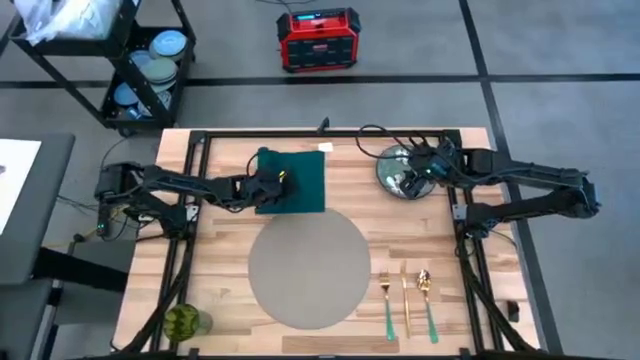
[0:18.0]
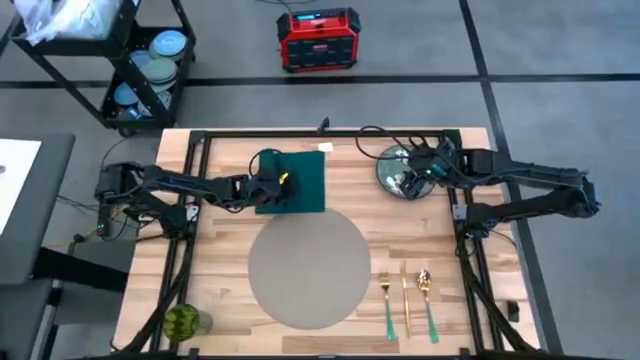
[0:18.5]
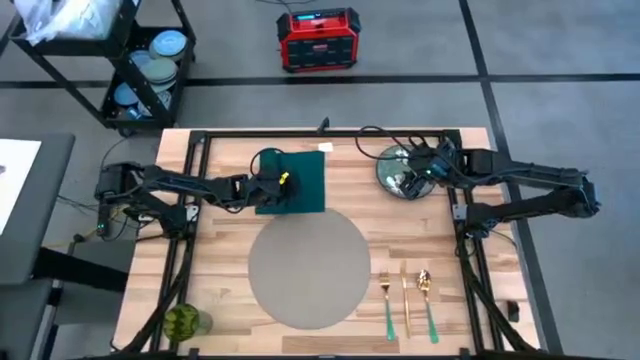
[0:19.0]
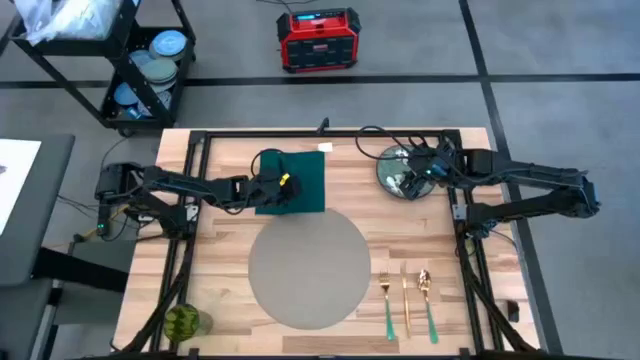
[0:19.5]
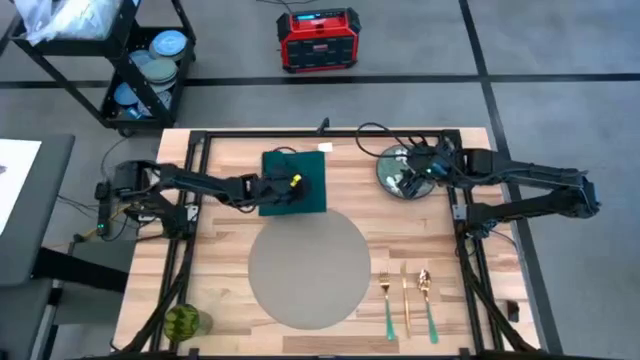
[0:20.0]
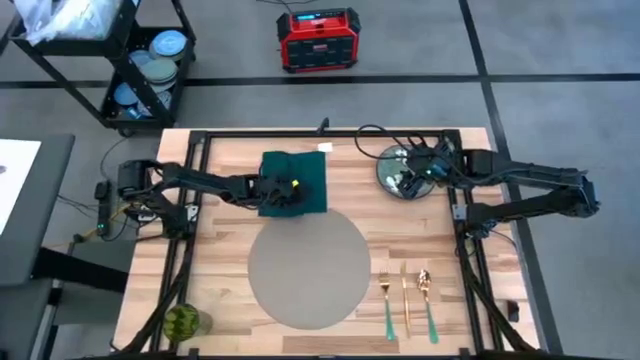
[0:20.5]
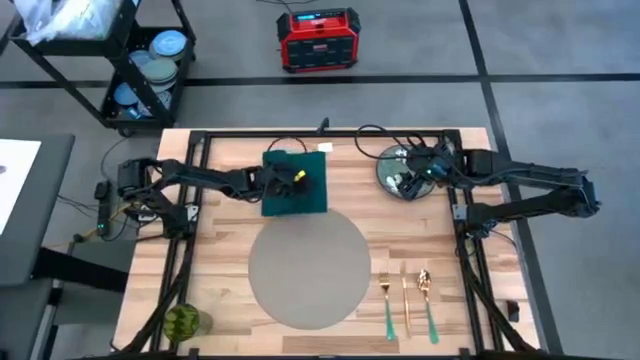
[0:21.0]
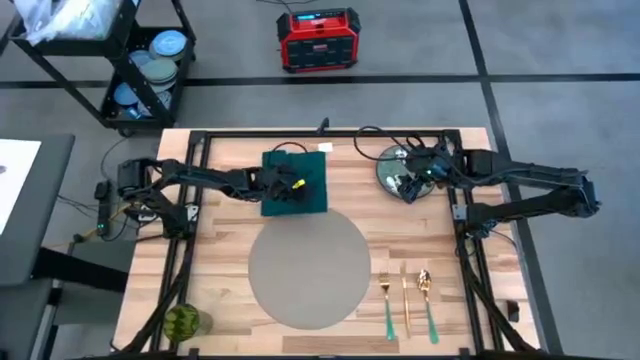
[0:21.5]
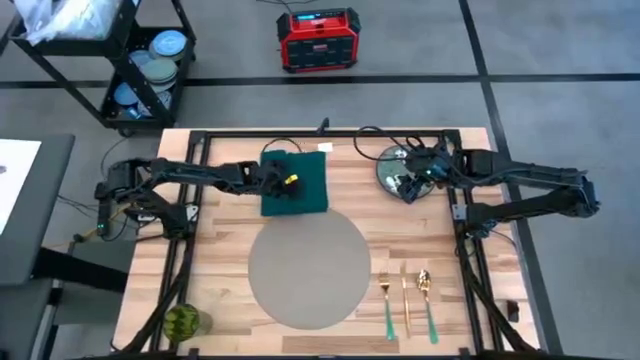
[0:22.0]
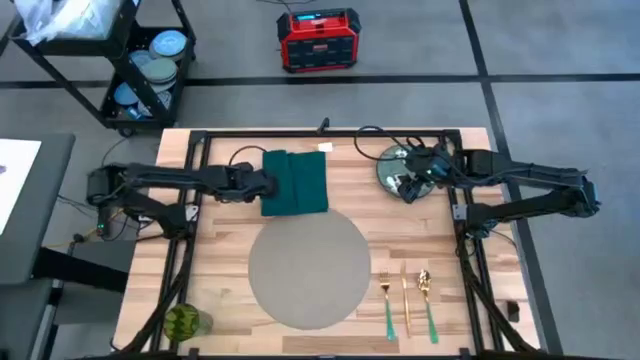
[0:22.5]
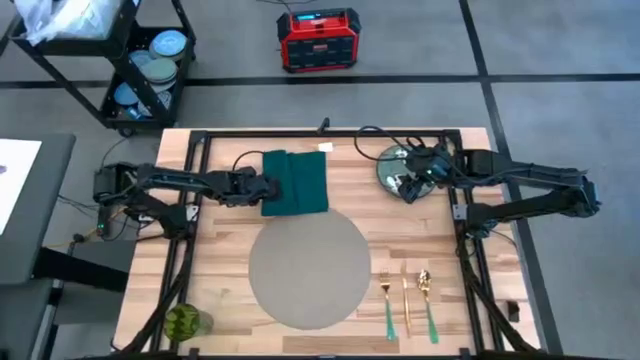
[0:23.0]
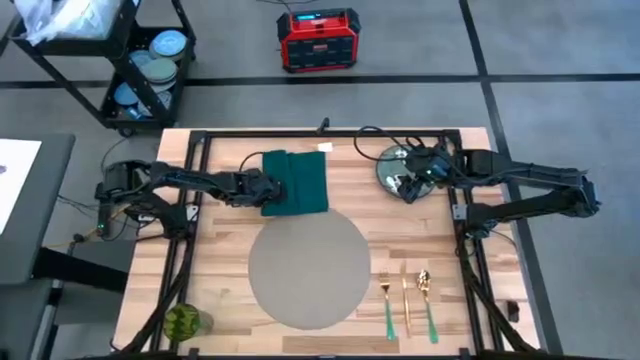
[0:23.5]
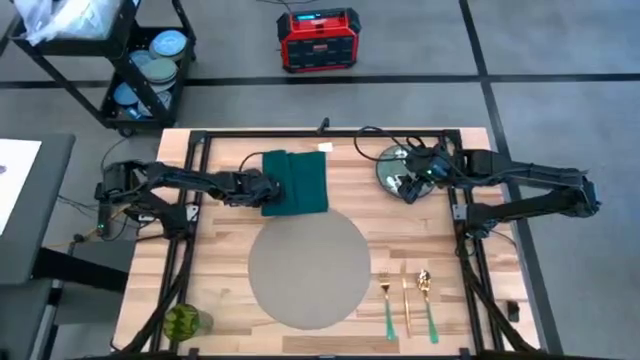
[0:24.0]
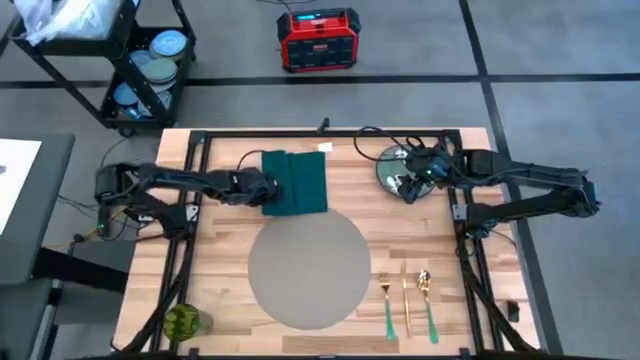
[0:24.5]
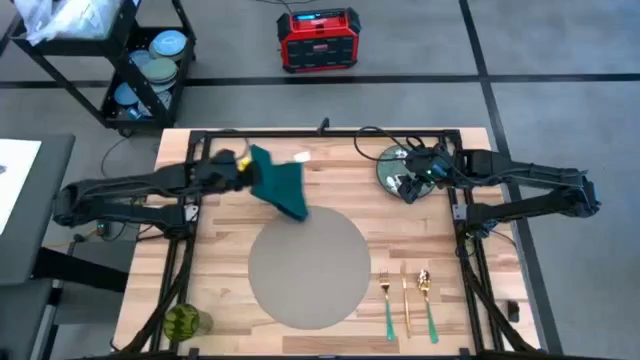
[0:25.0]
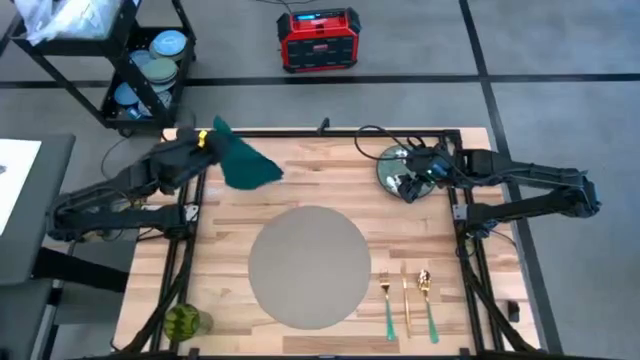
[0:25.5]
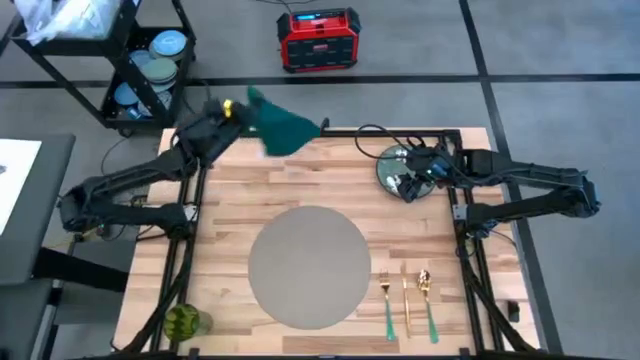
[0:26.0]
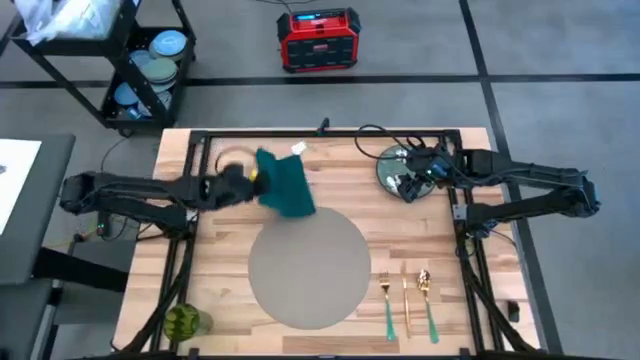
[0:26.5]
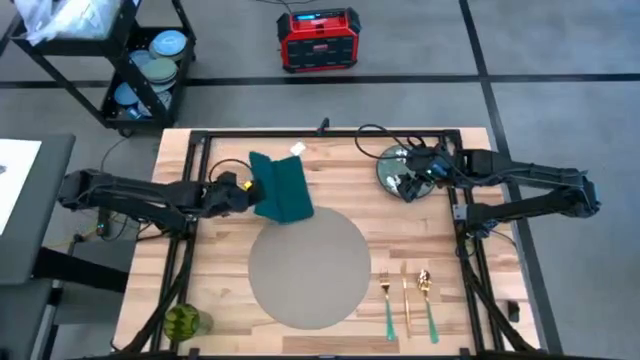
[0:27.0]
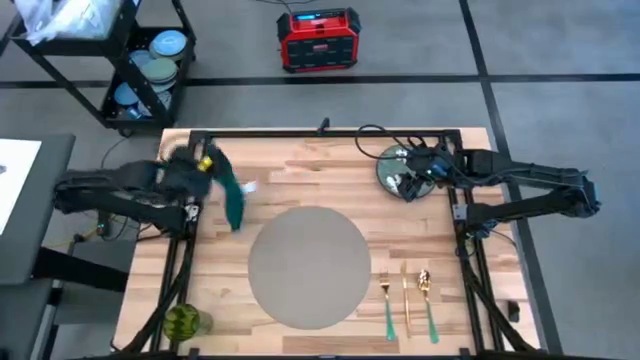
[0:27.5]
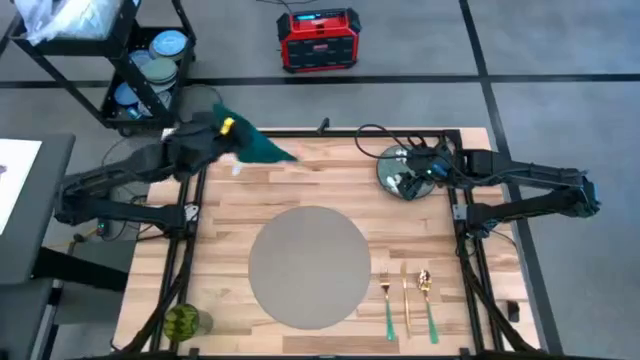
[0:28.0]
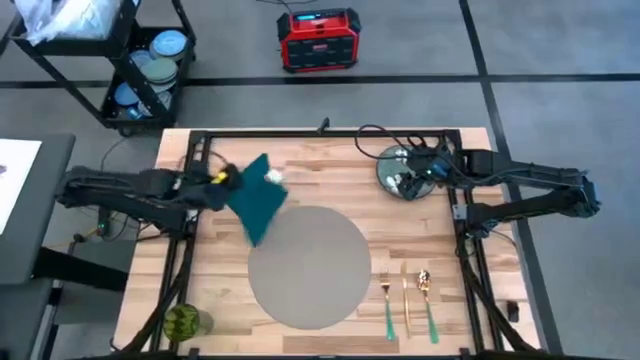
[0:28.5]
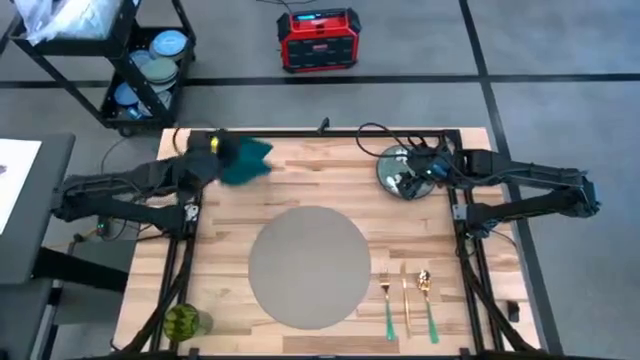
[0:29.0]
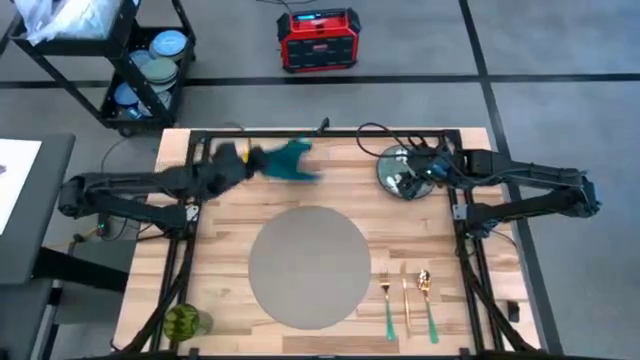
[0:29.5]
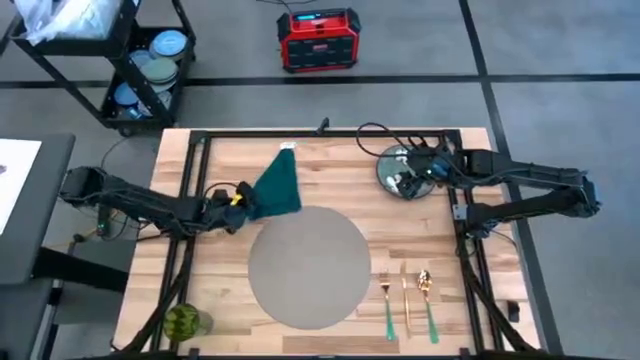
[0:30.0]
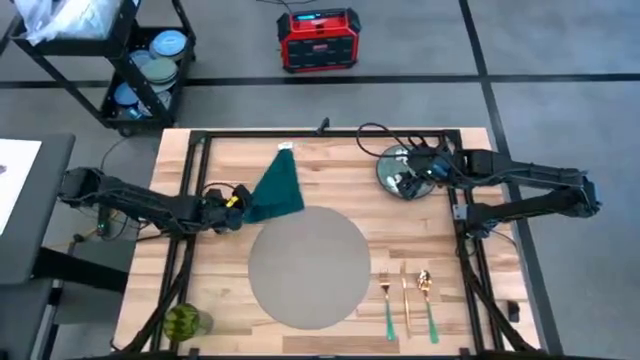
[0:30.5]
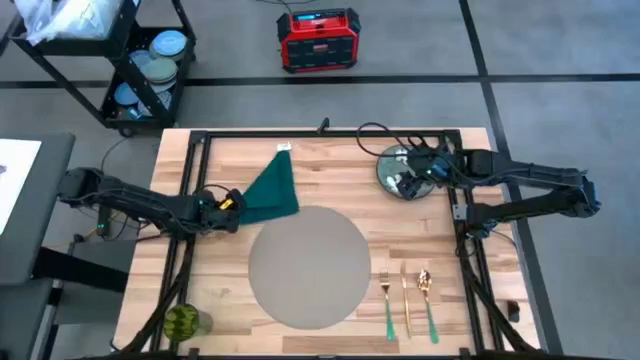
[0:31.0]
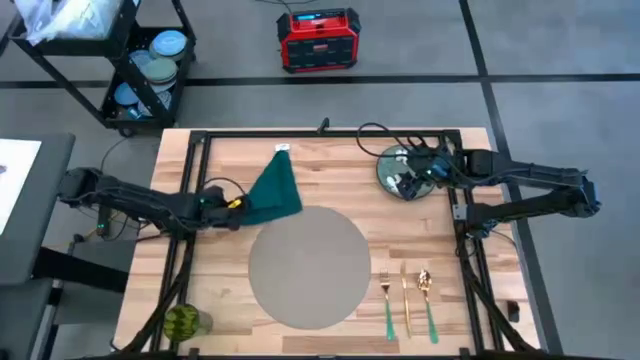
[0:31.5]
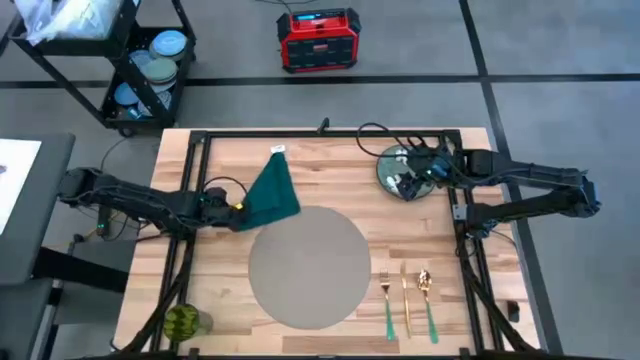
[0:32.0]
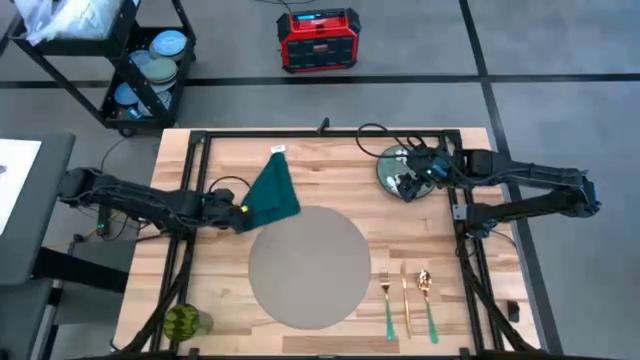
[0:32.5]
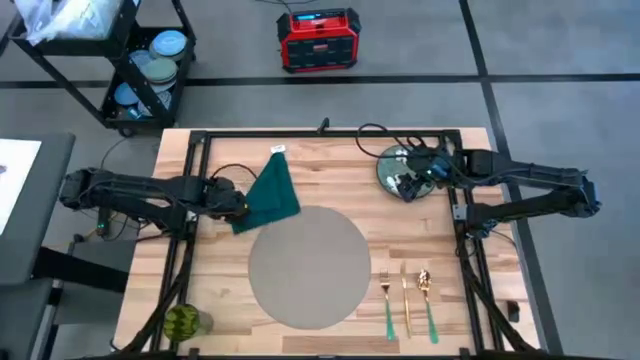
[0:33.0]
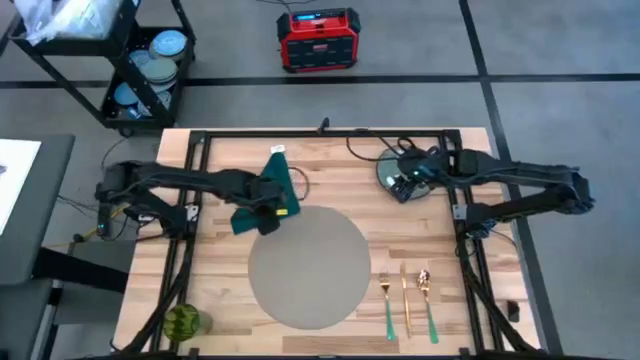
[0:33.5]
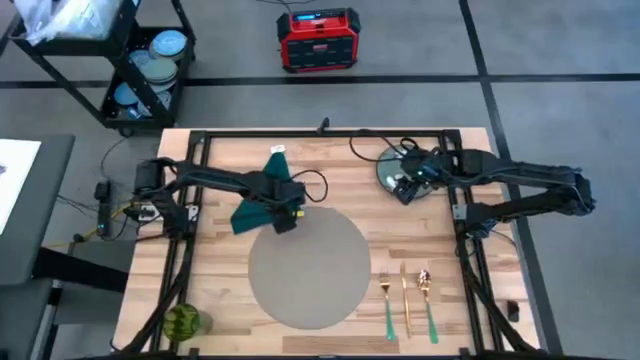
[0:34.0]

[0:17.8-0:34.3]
Task: Set table place
Fold the blue table napkin

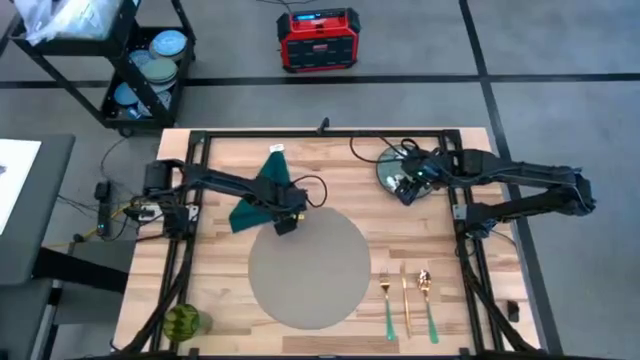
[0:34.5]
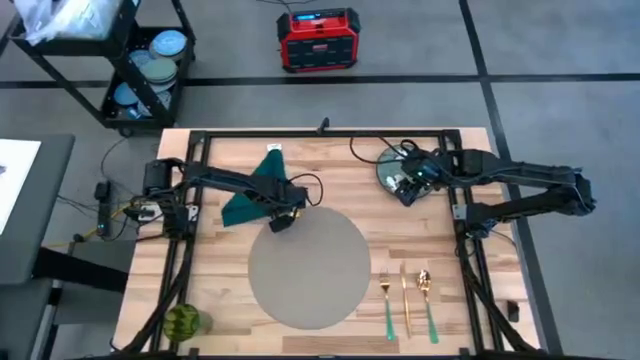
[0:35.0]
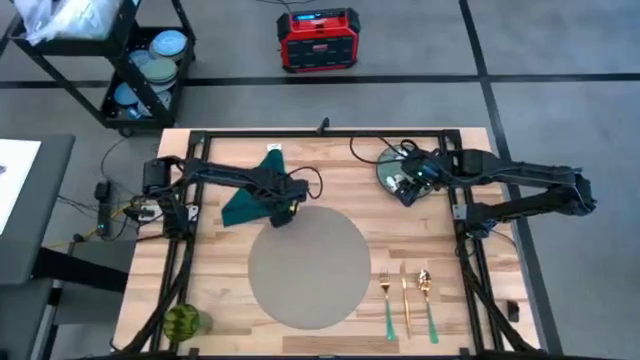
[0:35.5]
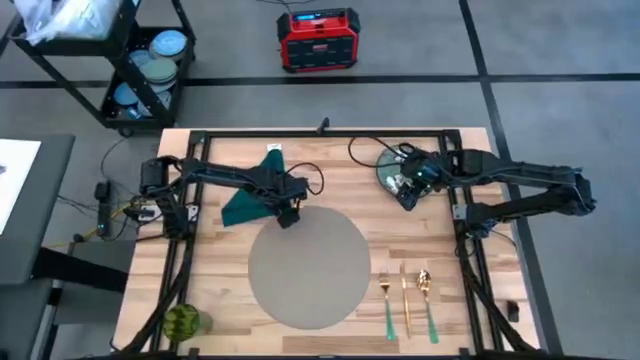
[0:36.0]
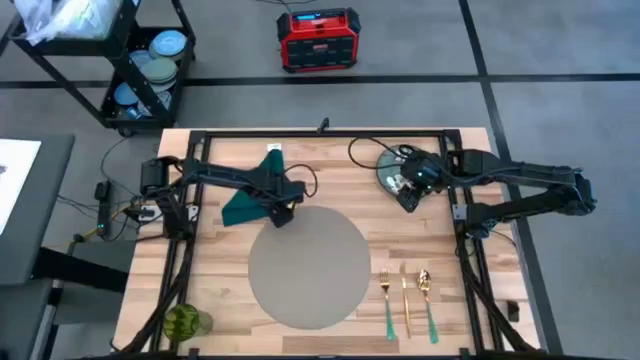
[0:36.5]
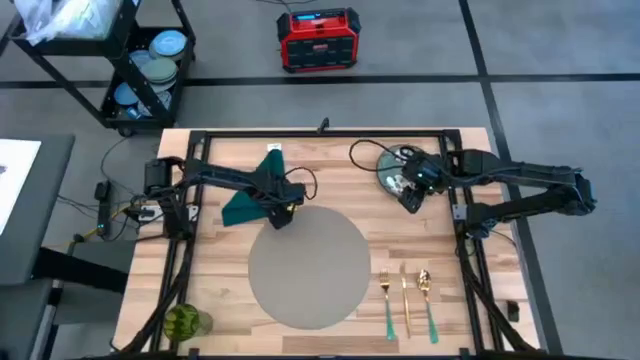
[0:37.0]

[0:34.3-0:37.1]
Fold the blue table napkin

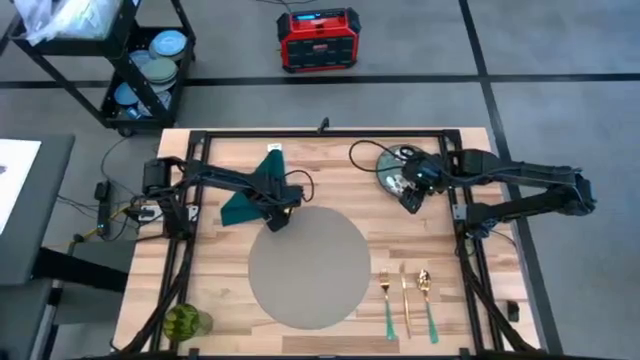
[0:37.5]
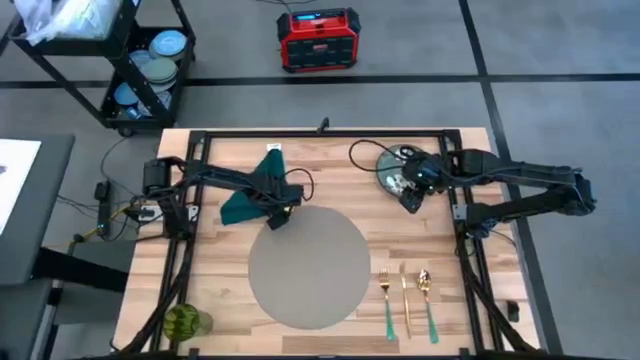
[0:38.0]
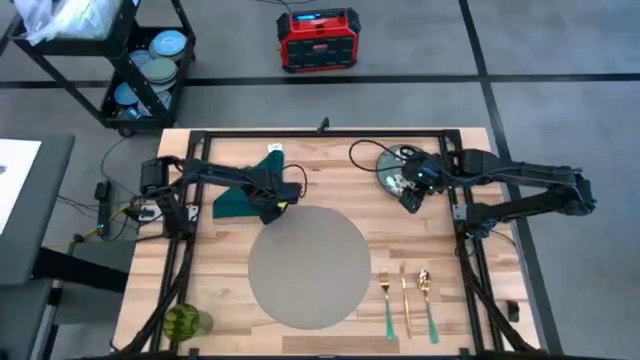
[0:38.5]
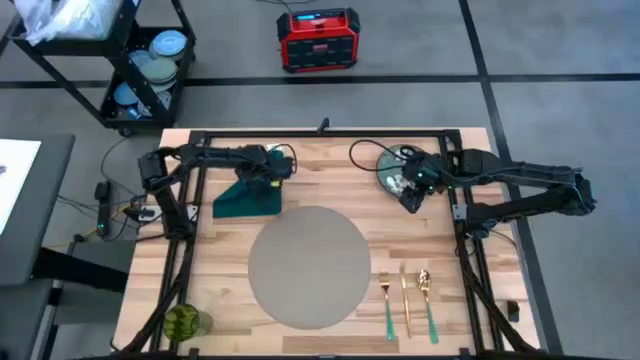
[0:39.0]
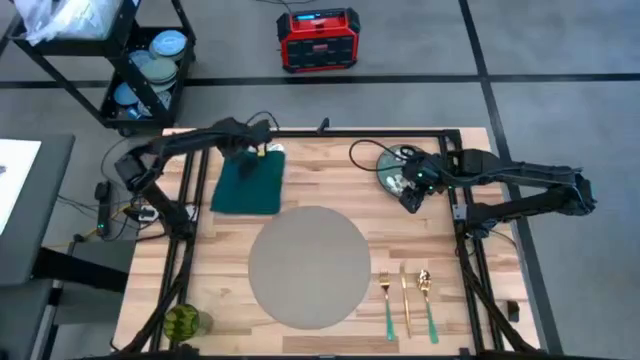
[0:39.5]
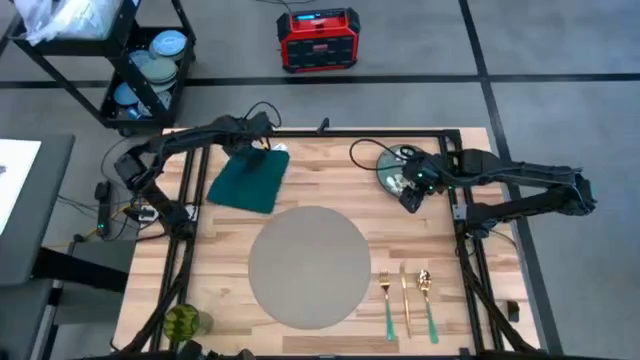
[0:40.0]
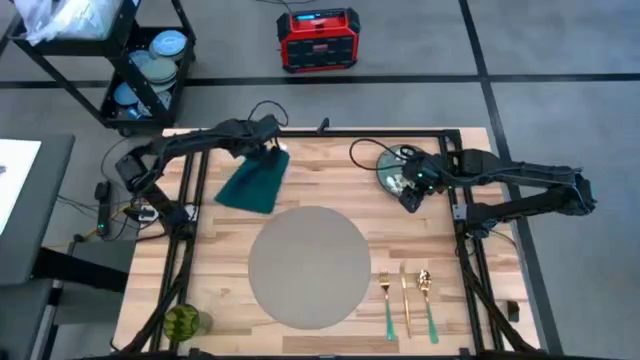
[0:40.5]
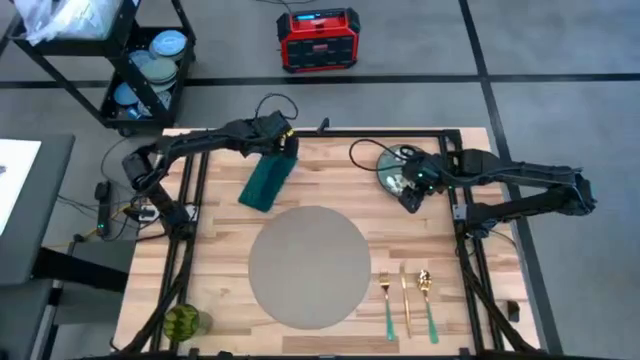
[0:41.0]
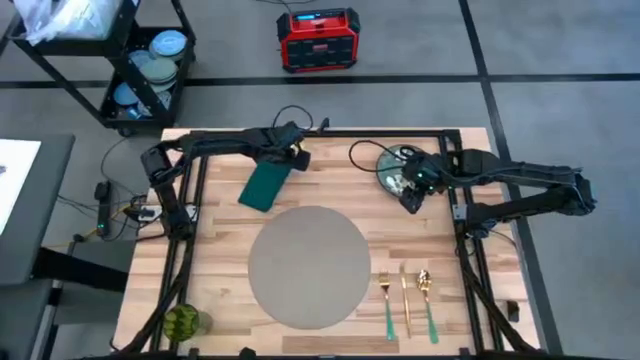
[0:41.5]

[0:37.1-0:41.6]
Fold the blue table napkin
